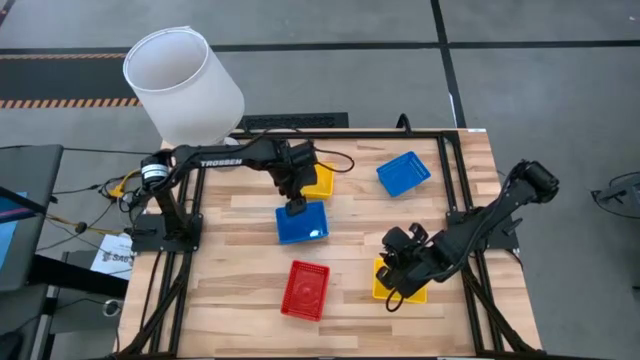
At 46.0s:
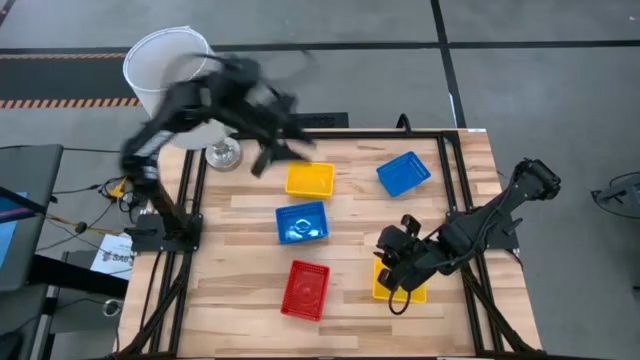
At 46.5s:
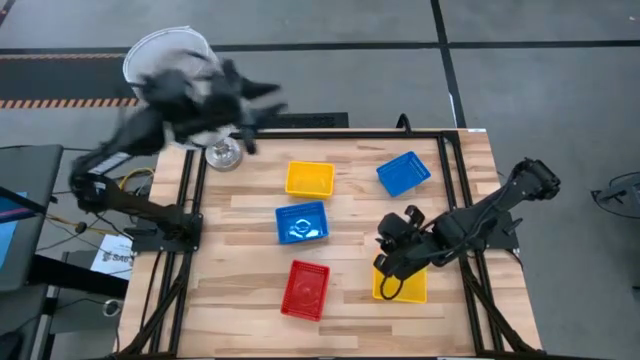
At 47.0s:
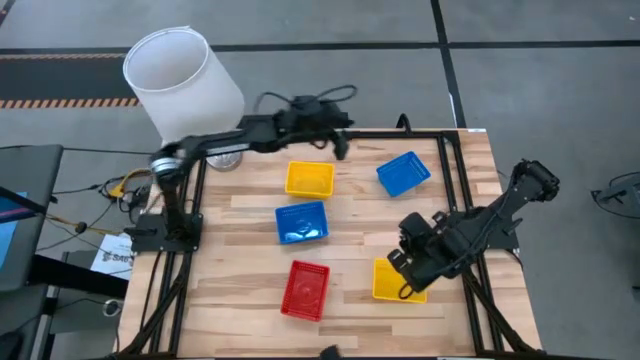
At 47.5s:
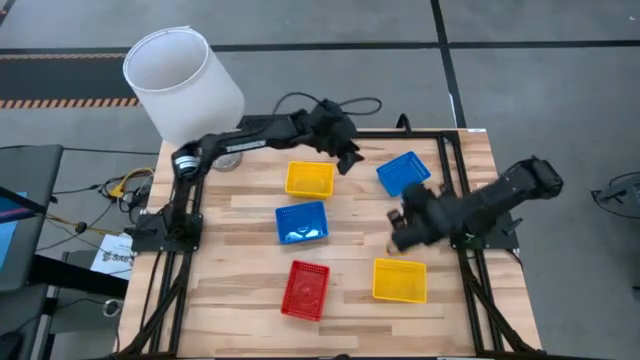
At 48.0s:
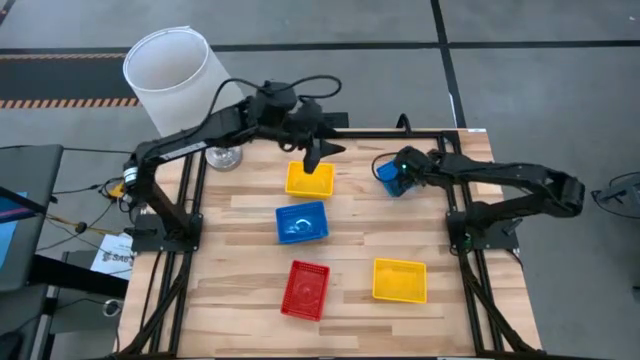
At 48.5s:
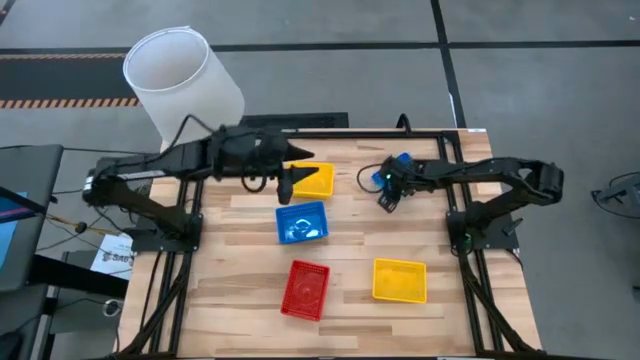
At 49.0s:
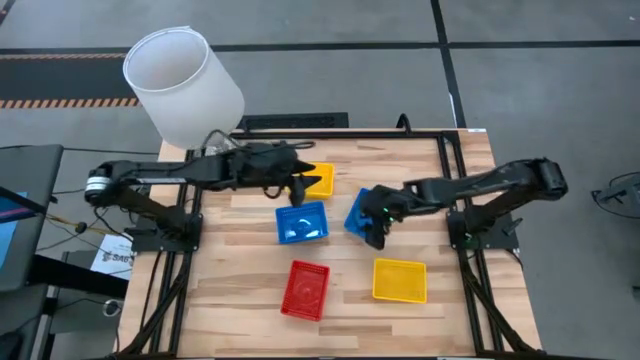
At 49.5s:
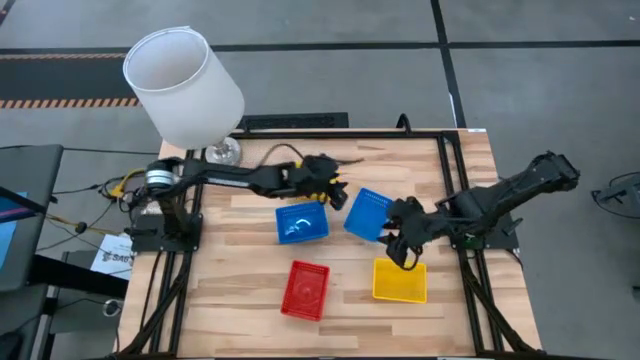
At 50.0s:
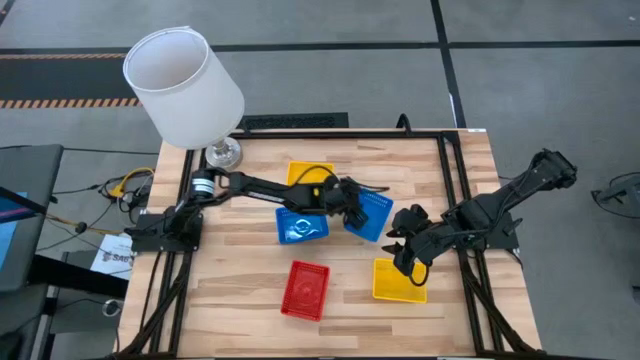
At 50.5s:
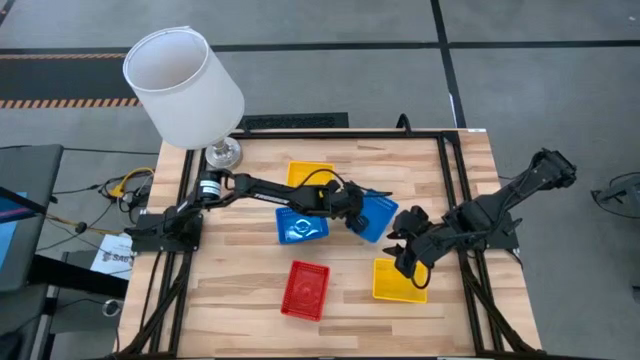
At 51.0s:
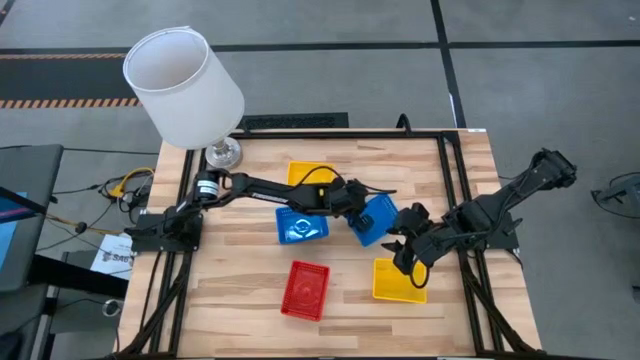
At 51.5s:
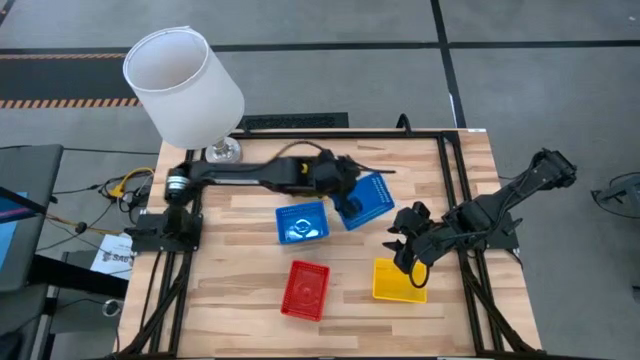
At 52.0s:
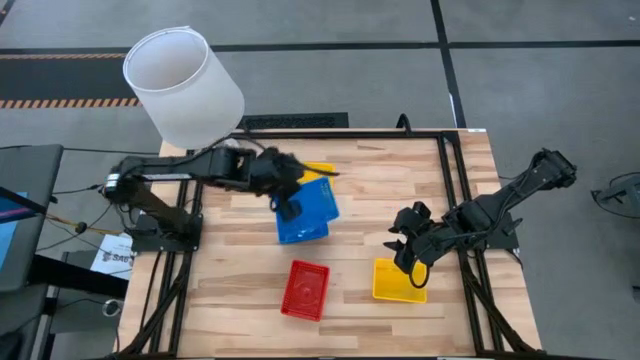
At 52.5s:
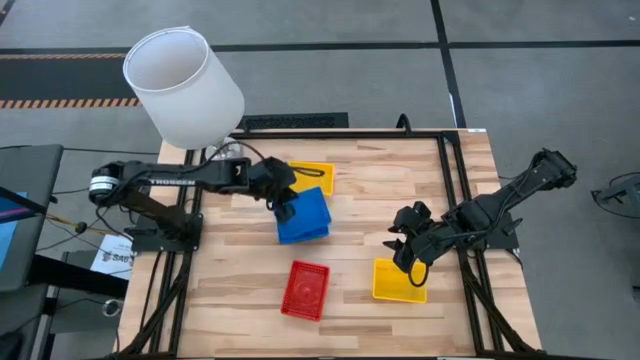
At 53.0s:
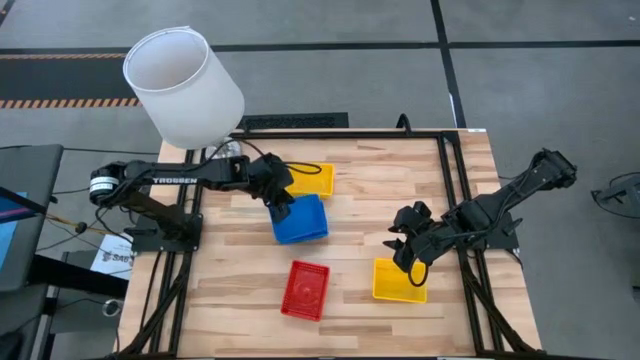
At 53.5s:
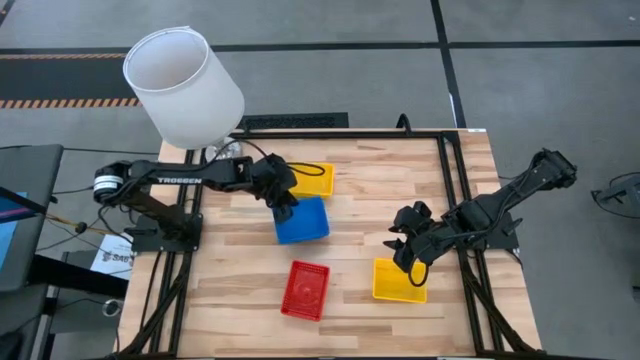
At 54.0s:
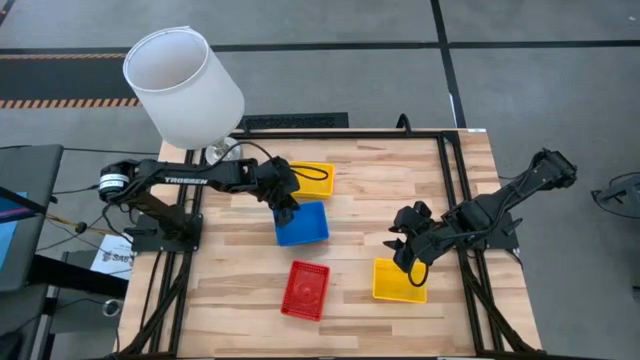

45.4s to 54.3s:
Stack the right blue bin on top of the left blue bin

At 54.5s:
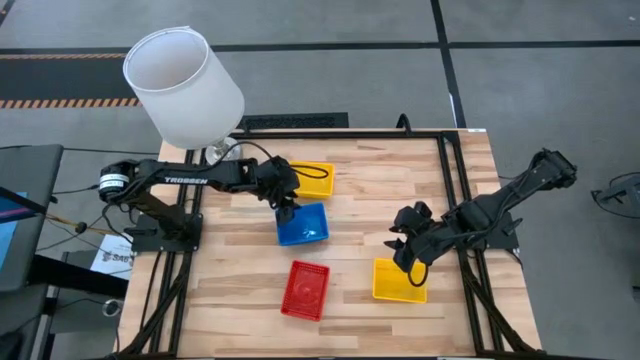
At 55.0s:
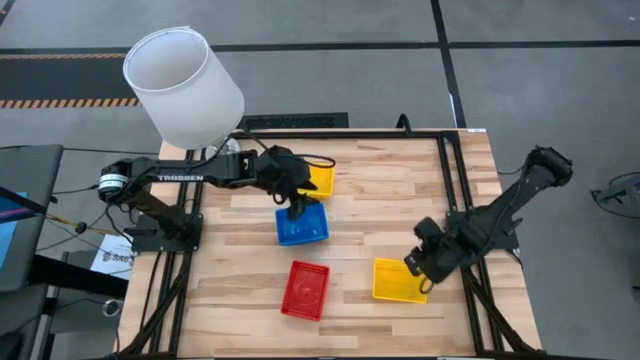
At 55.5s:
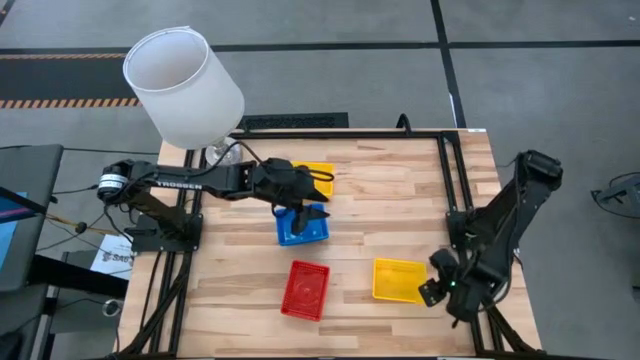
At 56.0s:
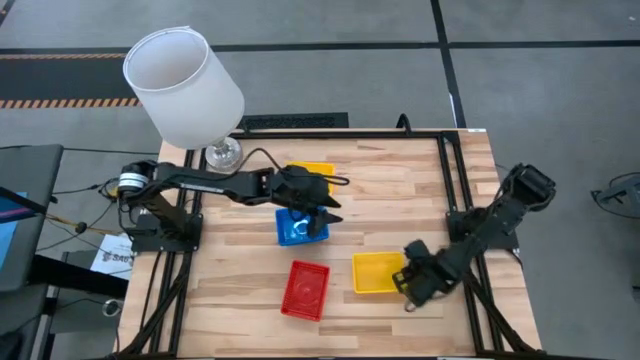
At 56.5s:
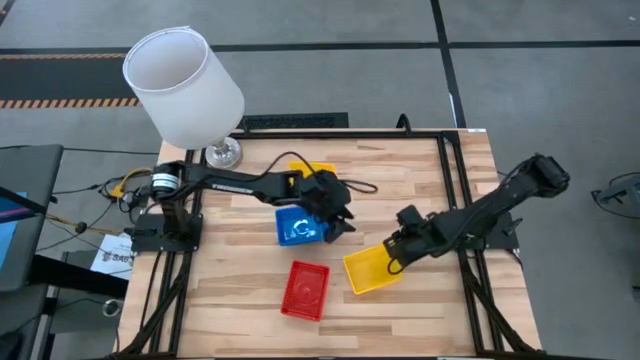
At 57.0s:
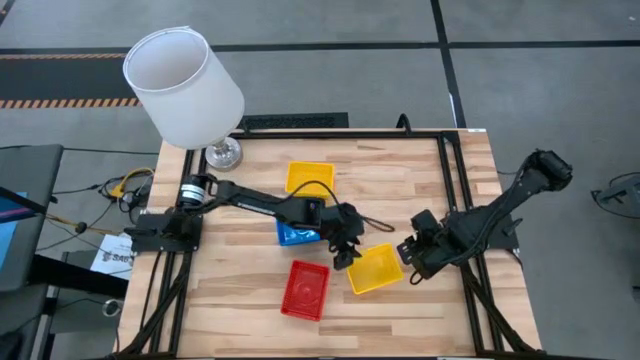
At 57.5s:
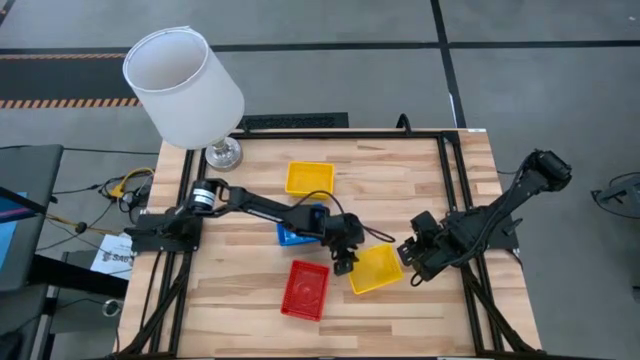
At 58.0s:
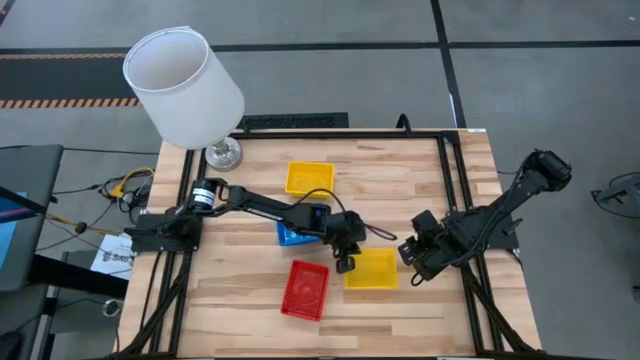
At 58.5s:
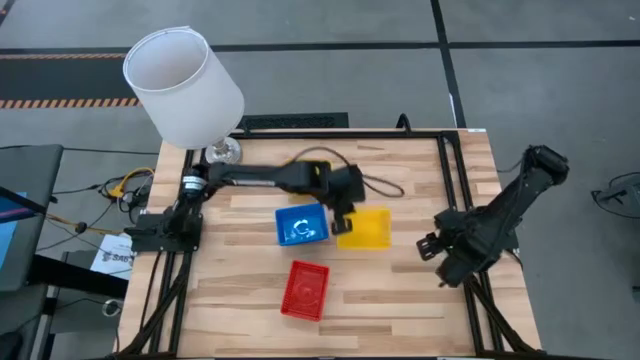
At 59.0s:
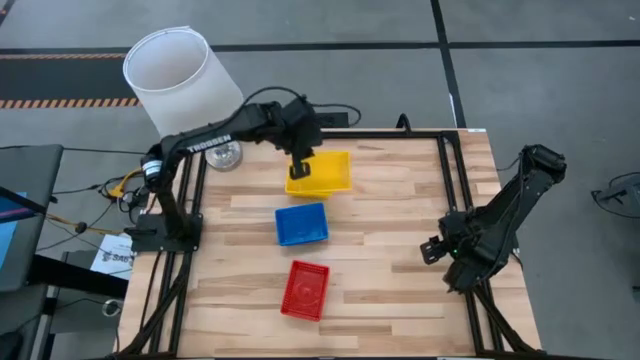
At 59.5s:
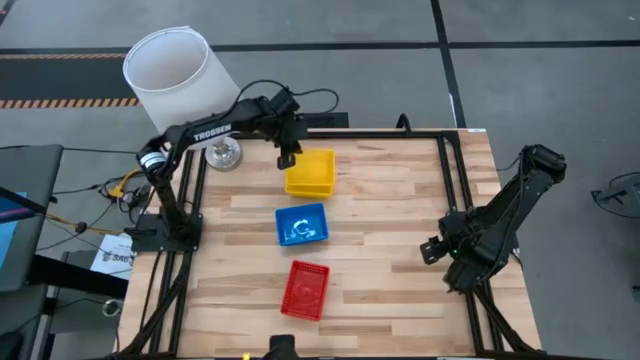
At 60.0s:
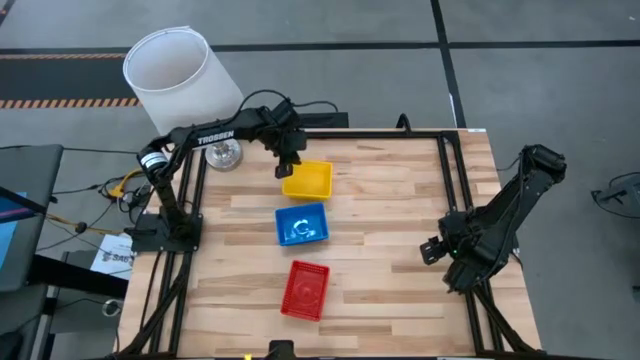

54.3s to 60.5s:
Stack the bottom yellow bin on top of the top yellow bin

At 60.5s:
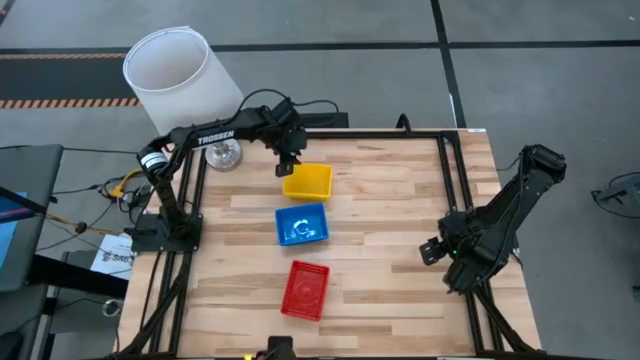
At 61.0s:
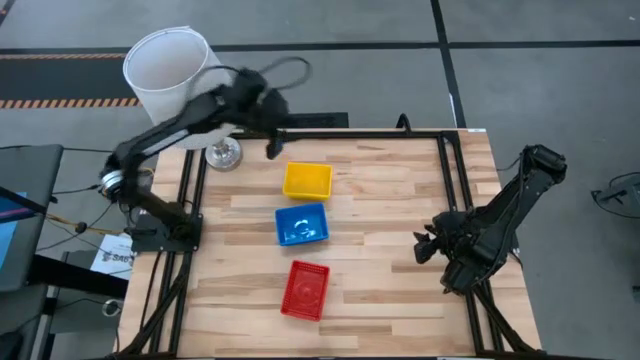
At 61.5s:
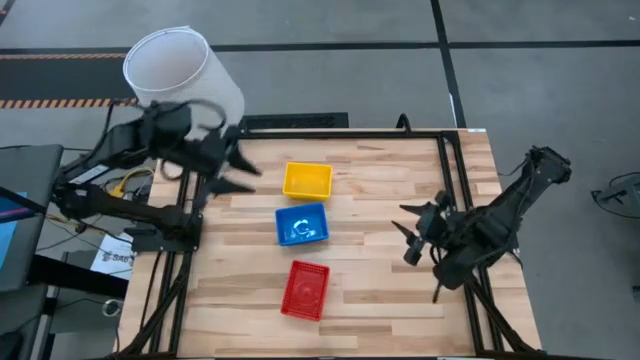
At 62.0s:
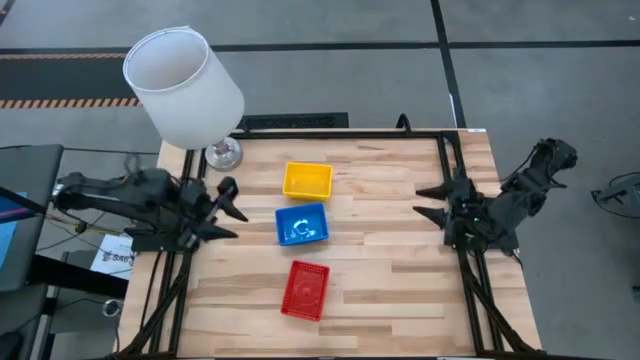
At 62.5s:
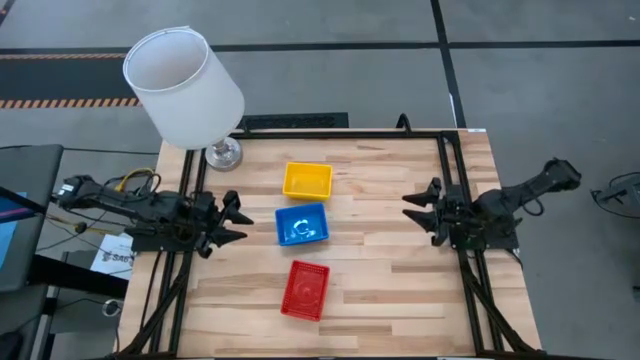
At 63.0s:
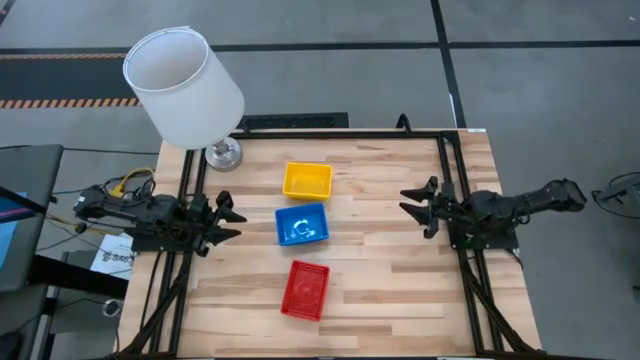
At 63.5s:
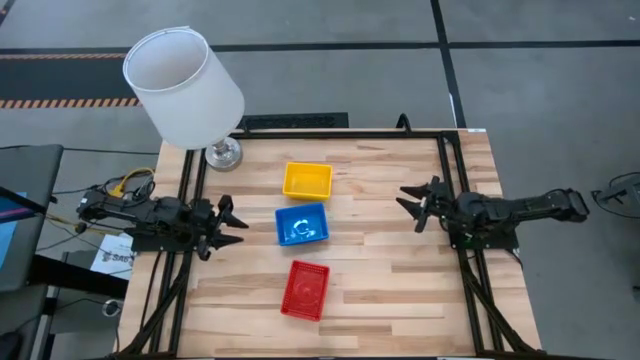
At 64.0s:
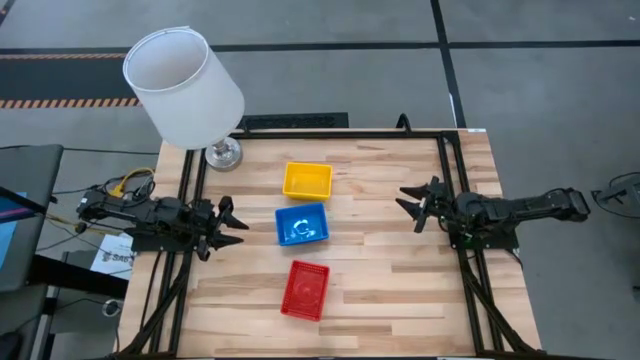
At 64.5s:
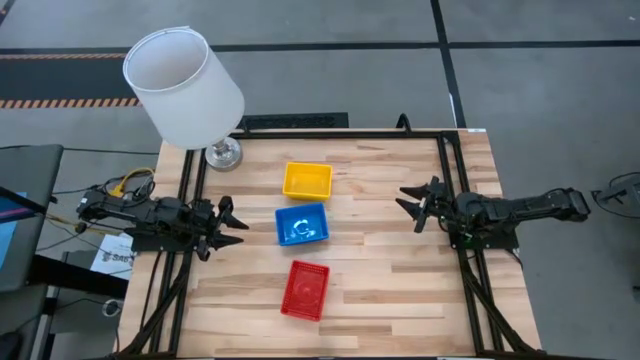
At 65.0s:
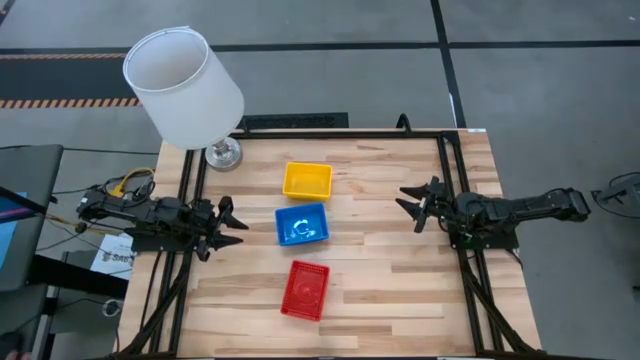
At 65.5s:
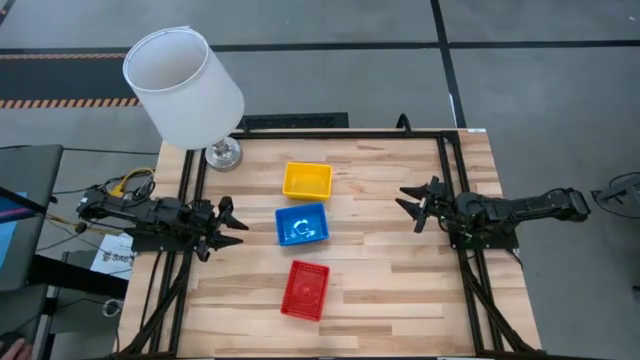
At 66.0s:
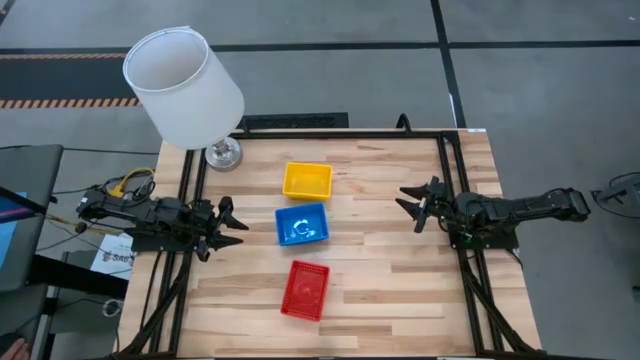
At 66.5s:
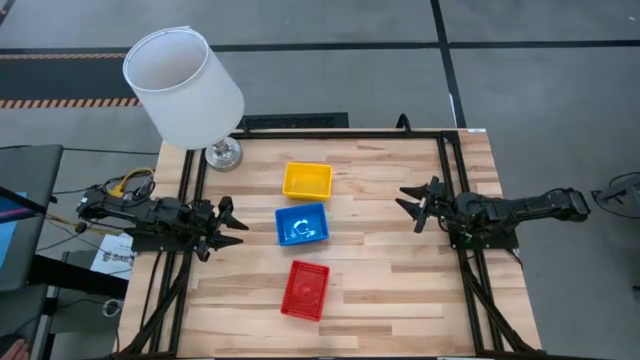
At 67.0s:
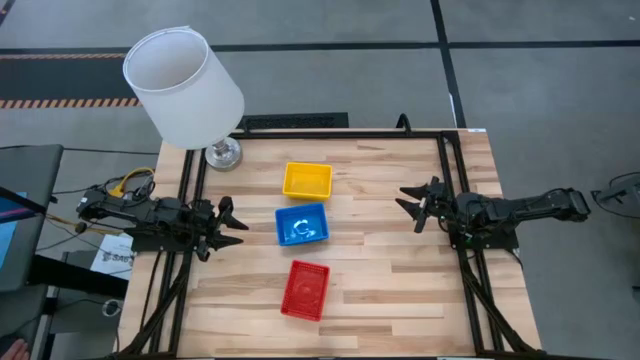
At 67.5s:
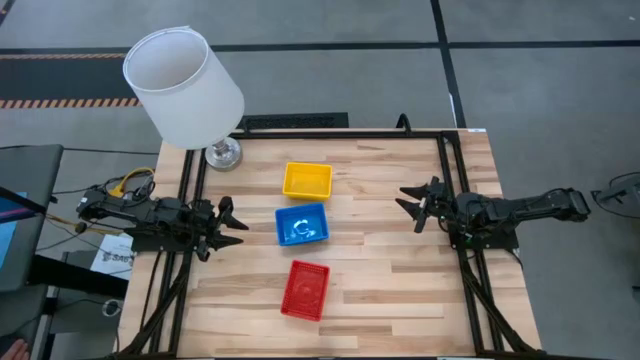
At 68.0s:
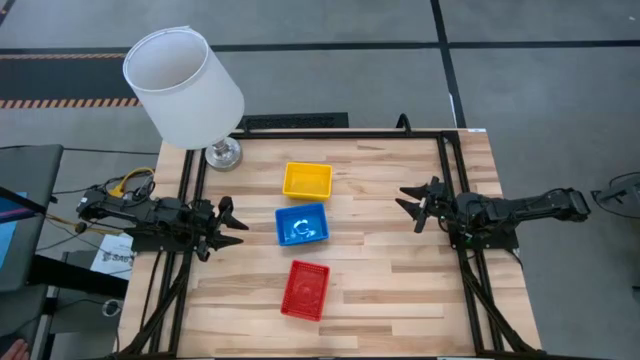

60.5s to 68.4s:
Return to Home Position
